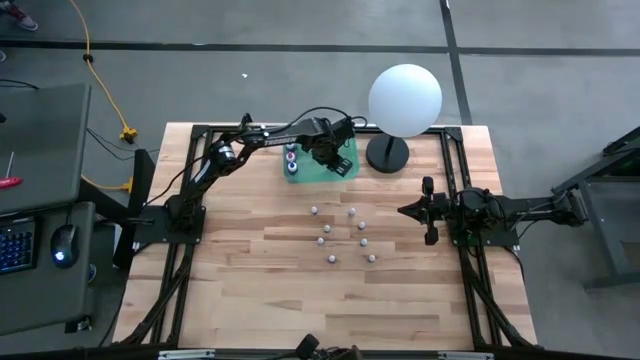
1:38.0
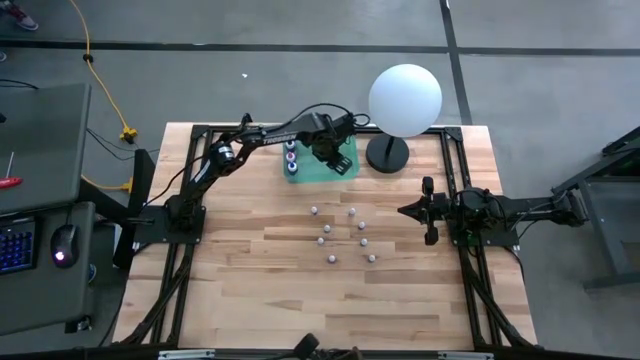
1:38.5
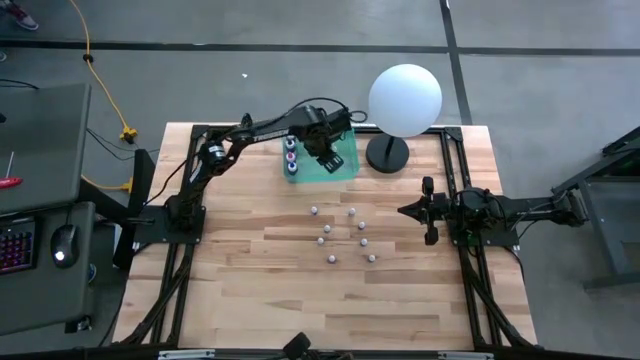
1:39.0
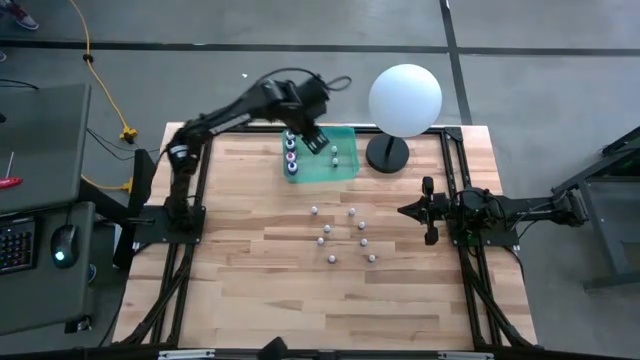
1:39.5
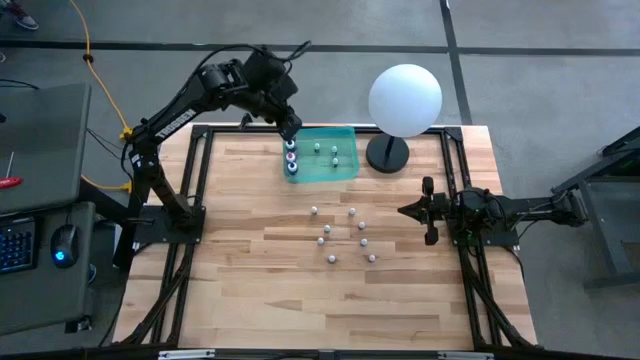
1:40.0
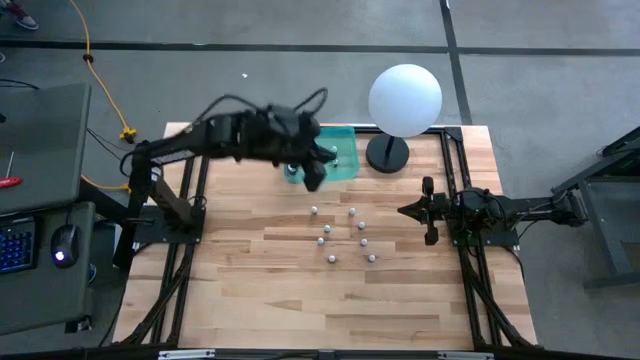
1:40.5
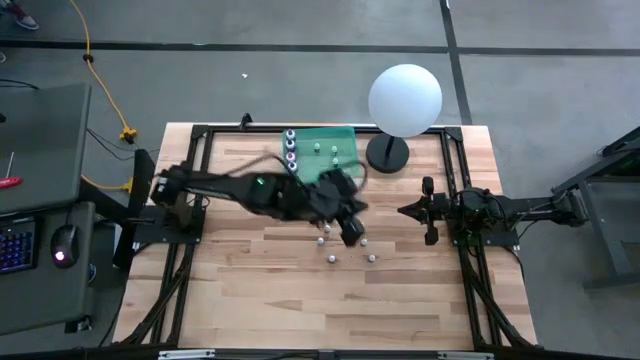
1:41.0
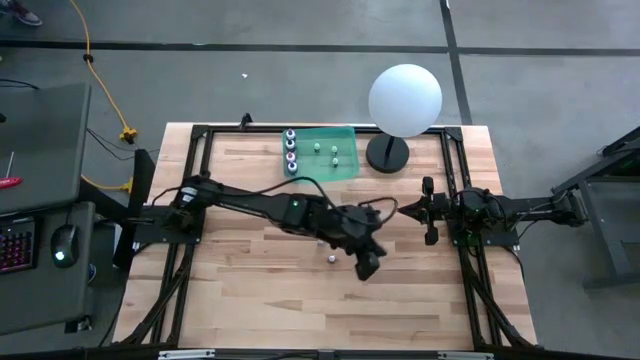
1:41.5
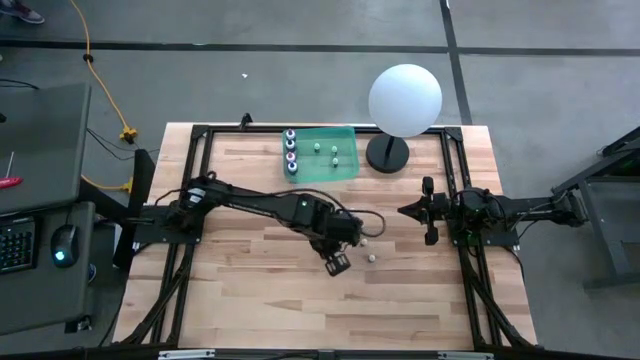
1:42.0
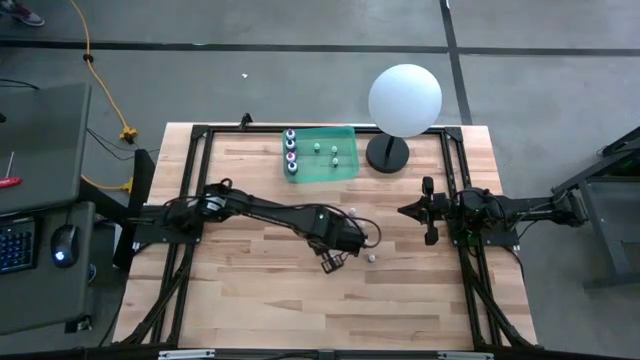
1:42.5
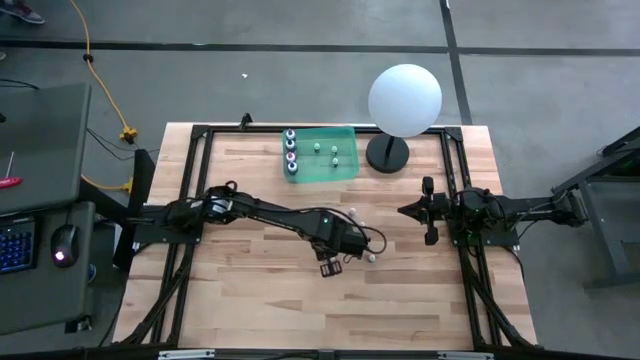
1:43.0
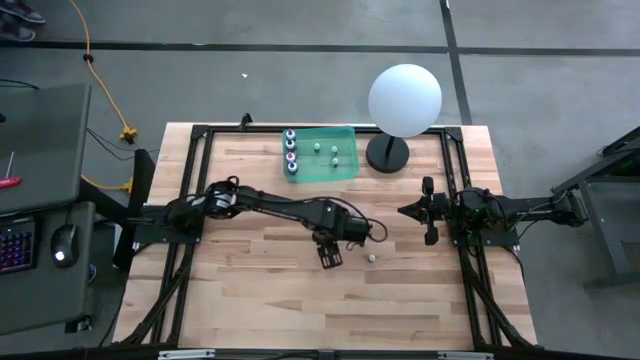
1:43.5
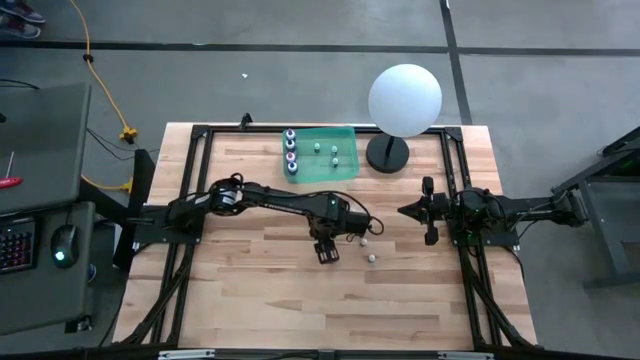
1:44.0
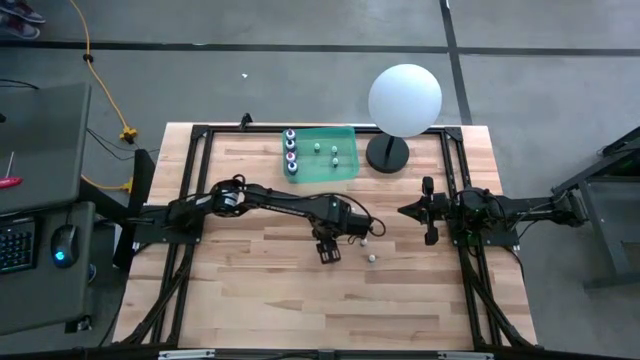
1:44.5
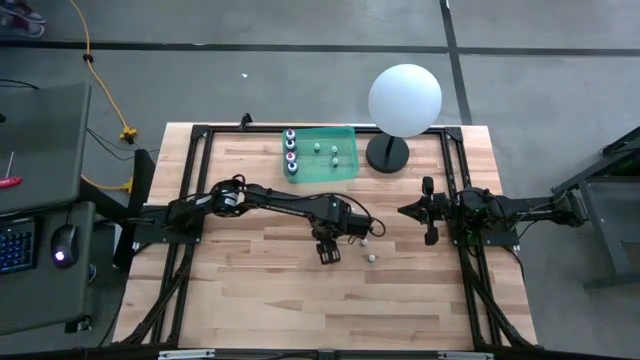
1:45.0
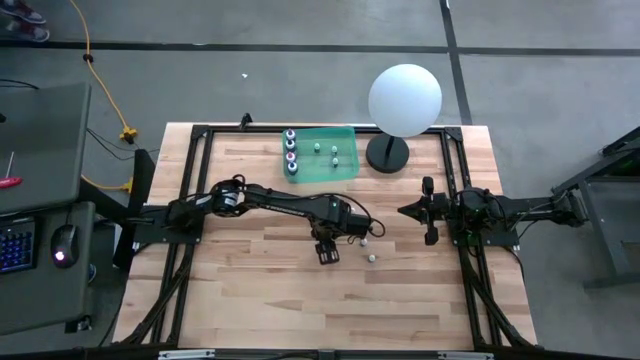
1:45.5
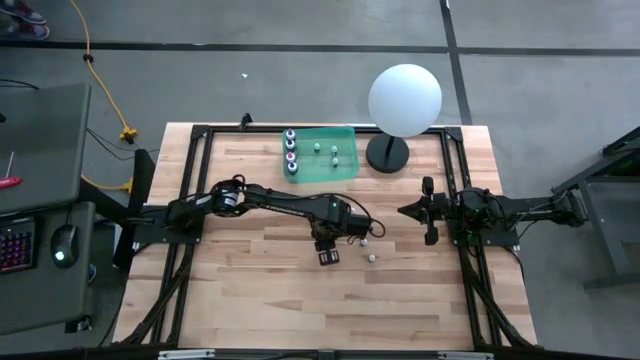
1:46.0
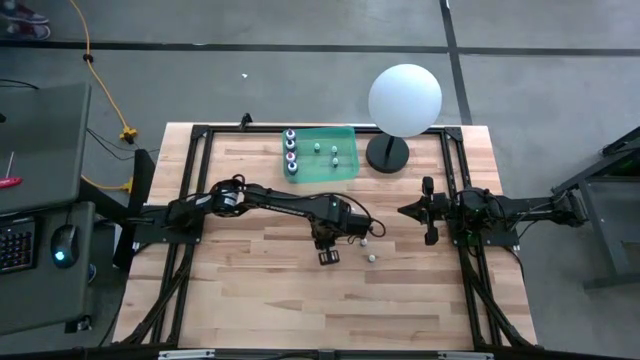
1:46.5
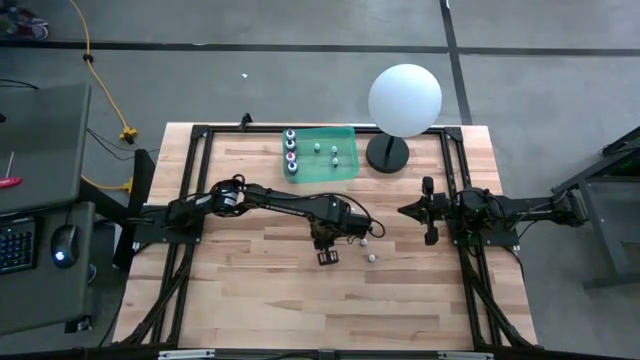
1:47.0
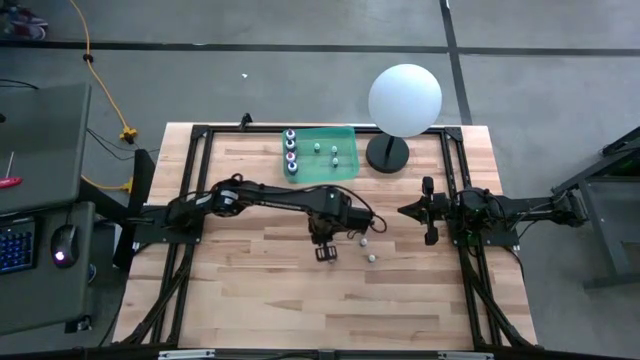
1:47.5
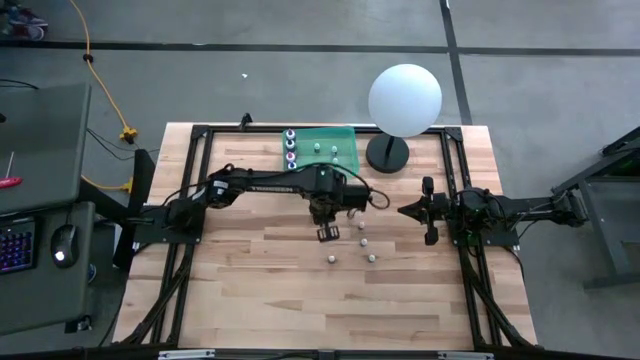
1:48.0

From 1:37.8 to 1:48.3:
Task: Pick & Place food coloring
Put the small red food coloring bottle into the green bin

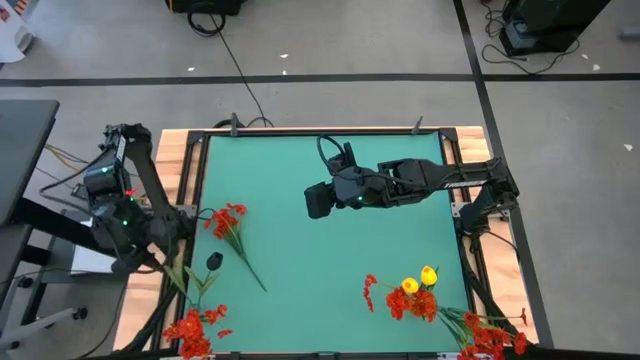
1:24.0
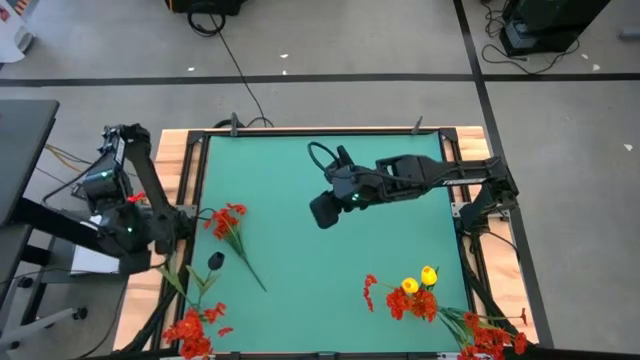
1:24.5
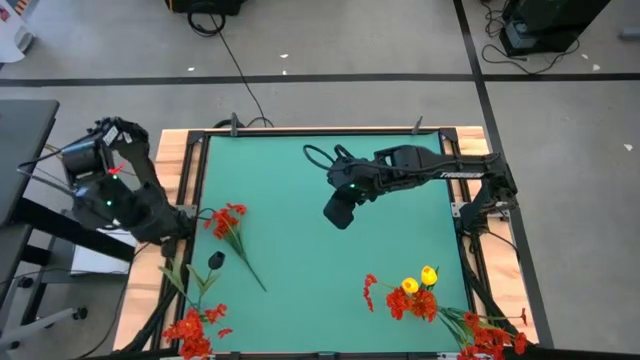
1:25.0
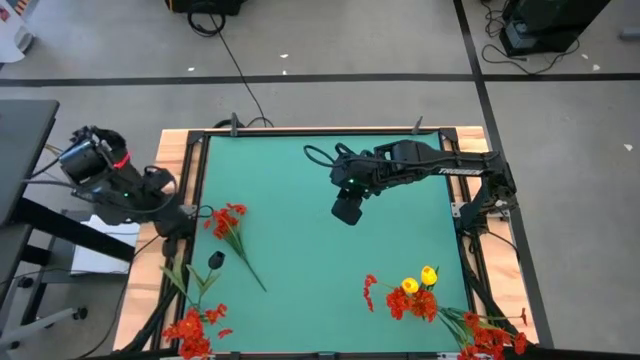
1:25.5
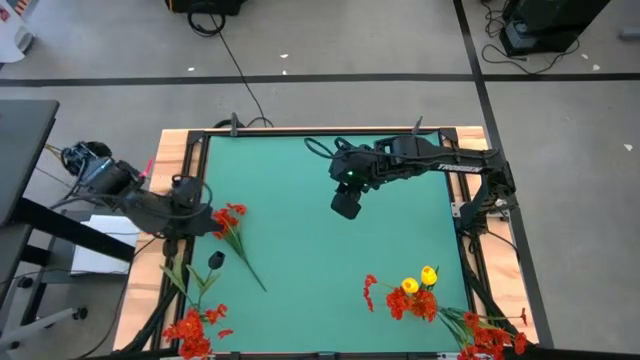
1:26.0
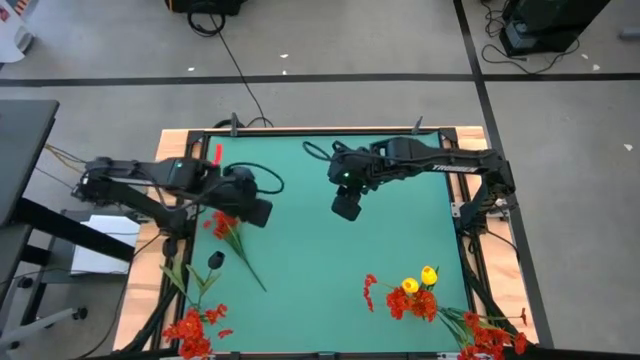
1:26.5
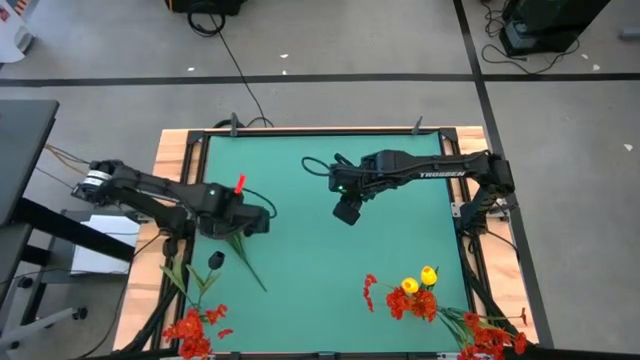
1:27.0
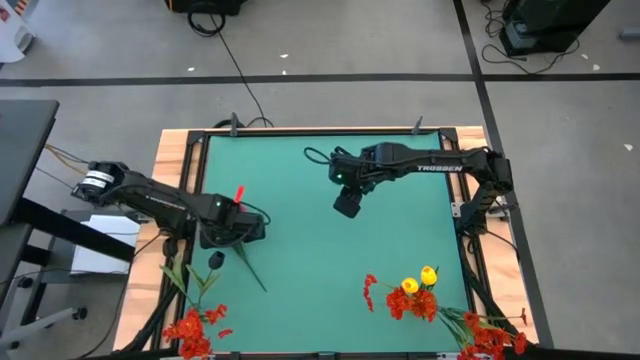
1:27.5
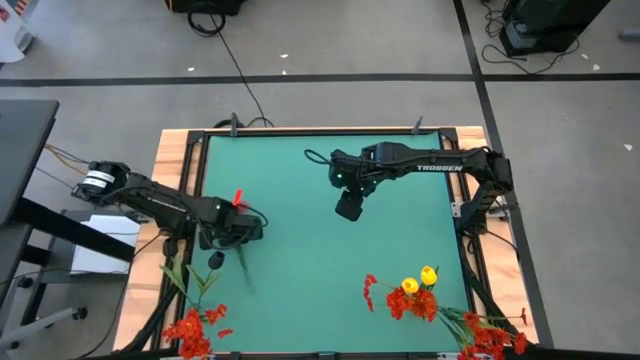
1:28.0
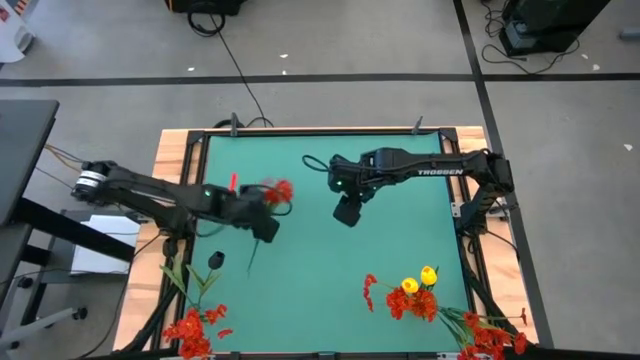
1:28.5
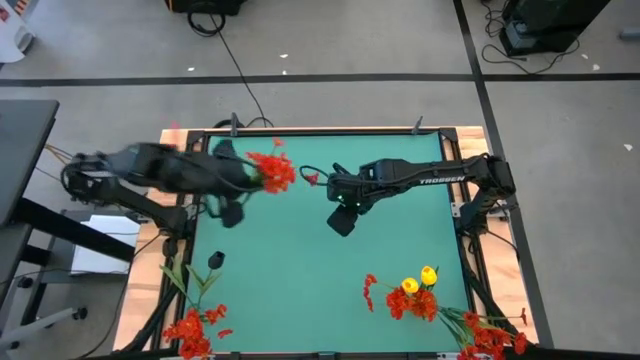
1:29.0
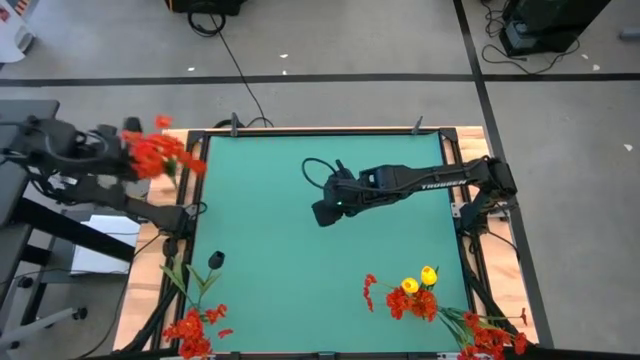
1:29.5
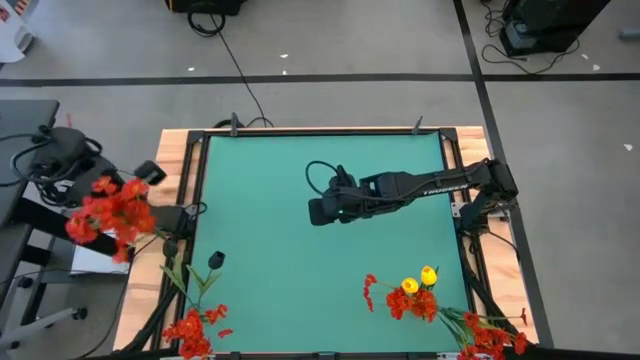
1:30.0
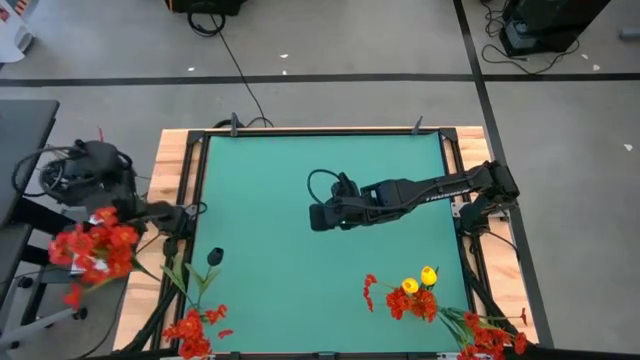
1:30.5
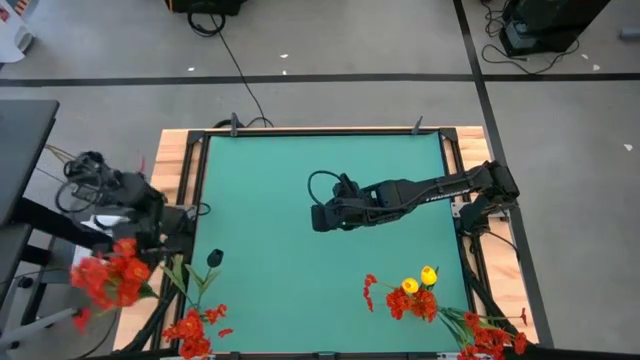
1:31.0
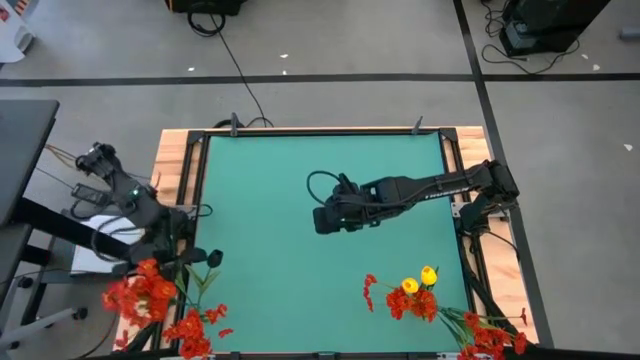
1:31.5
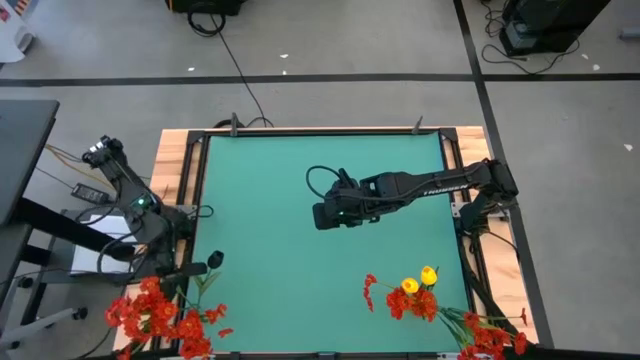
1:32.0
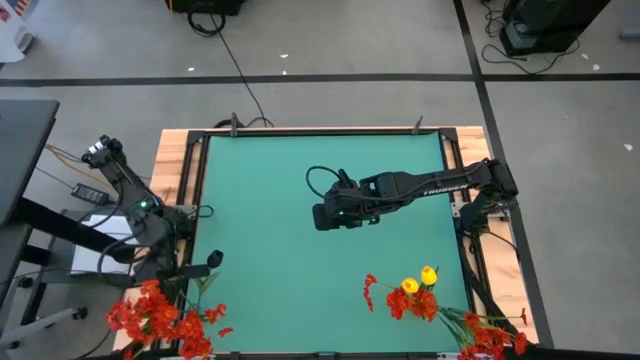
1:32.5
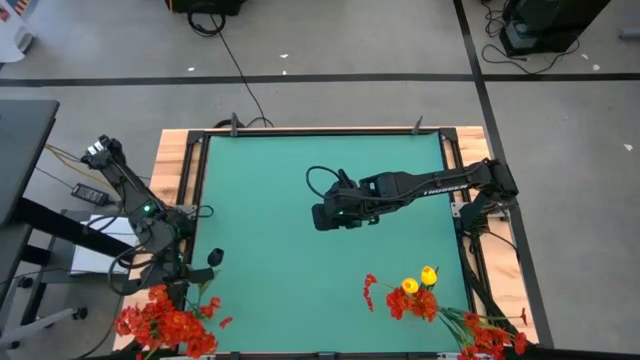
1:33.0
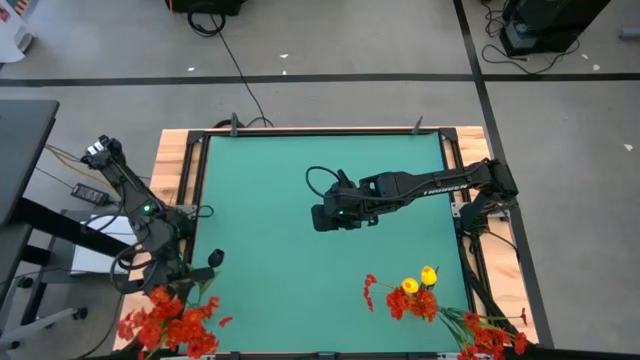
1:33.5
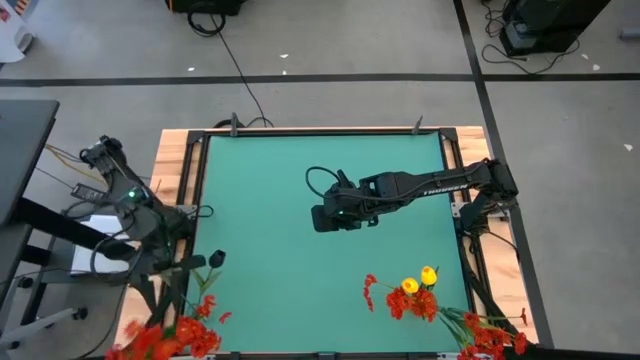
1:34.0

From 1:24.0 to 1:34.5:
Task: Sort flowers into vase by color
Put the red flowers into the transparent flower vase

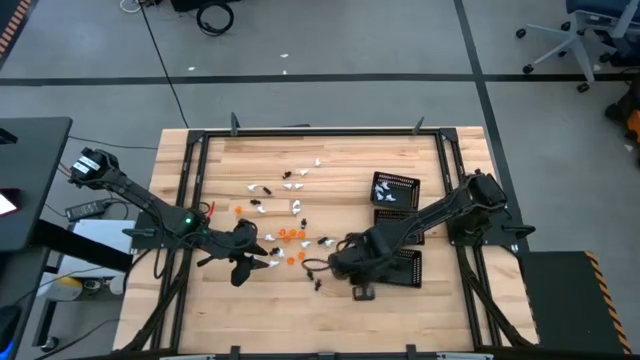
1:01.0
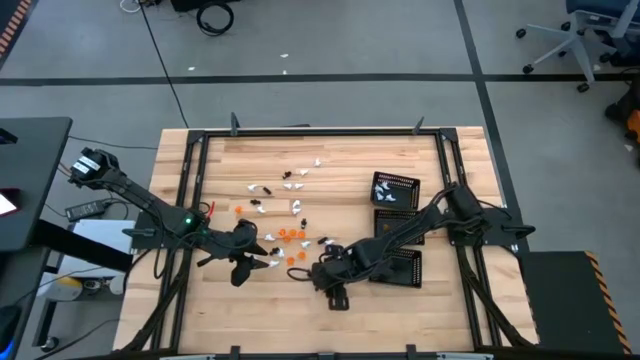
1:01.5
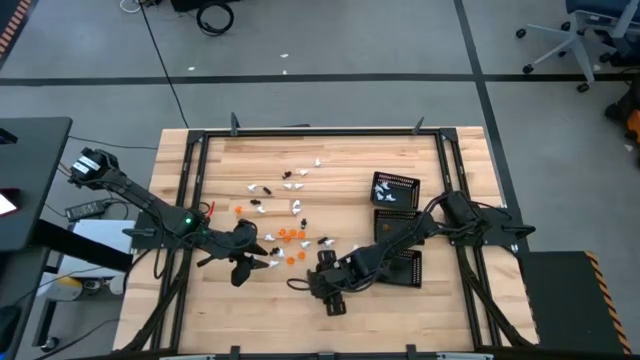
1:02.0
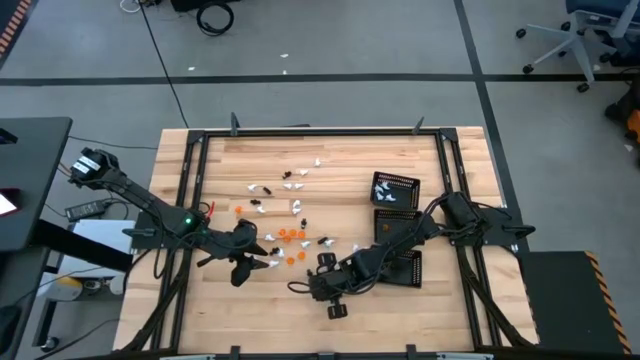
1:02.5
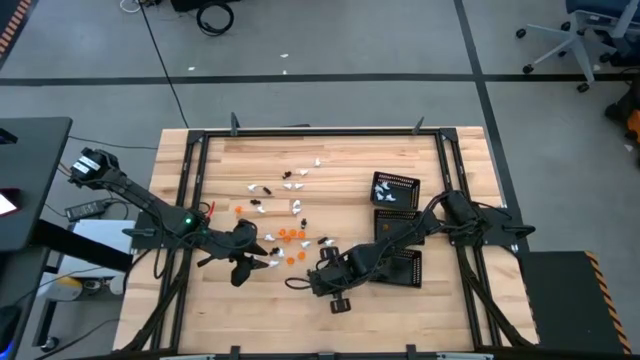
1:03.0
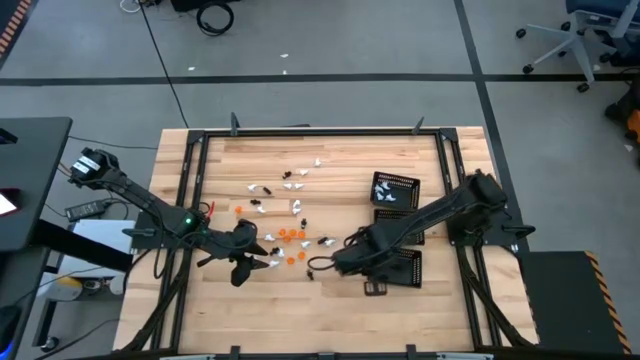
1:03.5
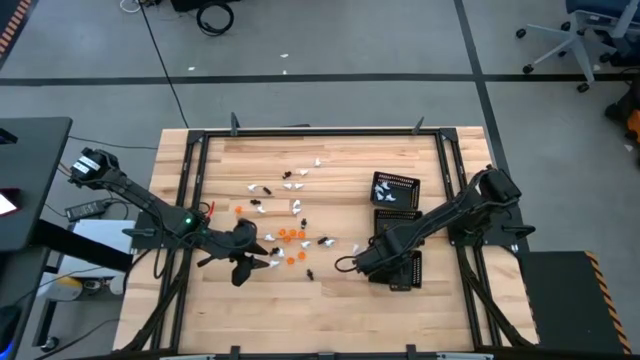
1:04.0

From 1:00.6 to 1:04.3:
Task: Sort Halloween decoration
Put the black ghost toy into the bottom black bin
